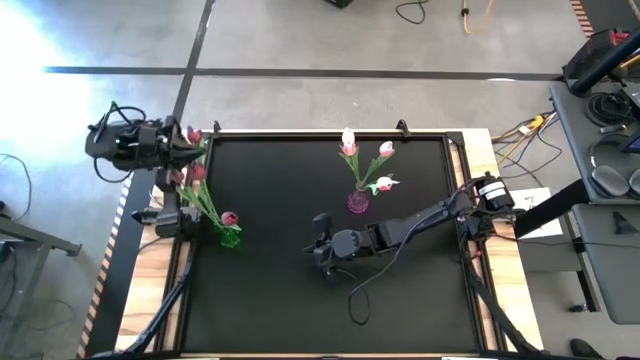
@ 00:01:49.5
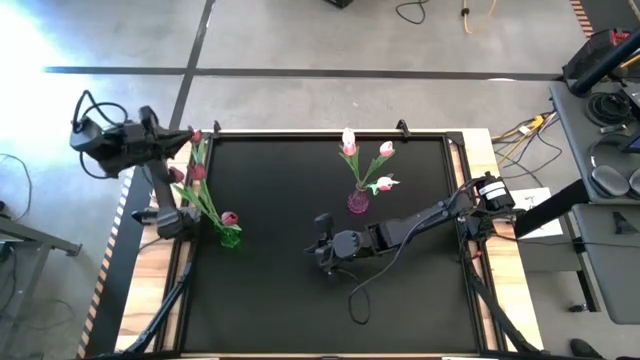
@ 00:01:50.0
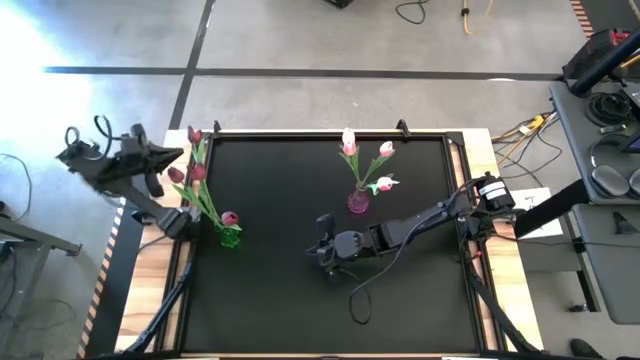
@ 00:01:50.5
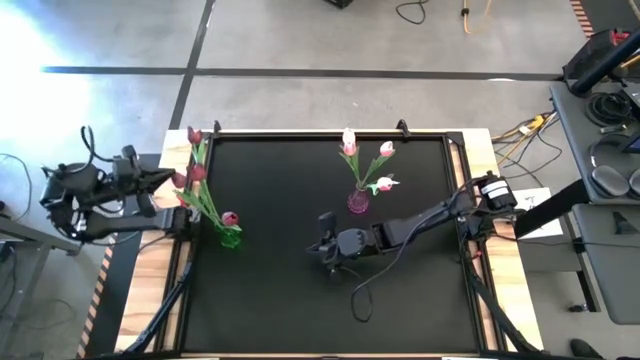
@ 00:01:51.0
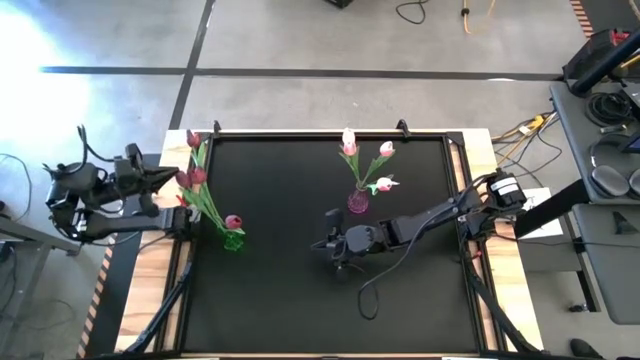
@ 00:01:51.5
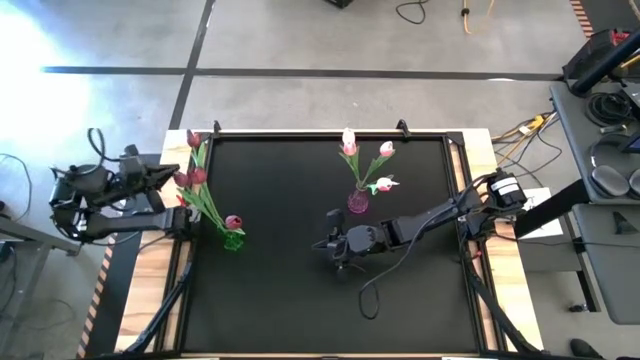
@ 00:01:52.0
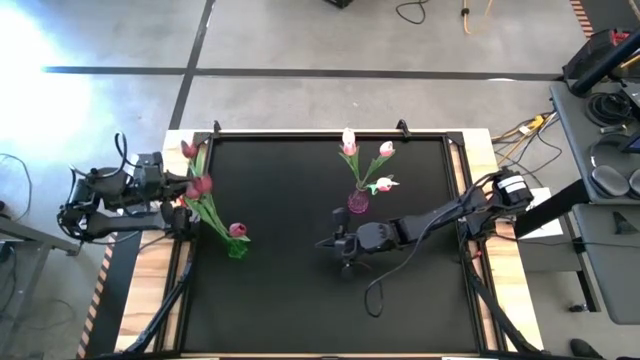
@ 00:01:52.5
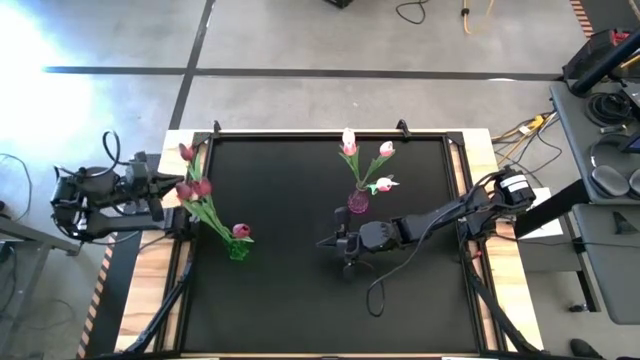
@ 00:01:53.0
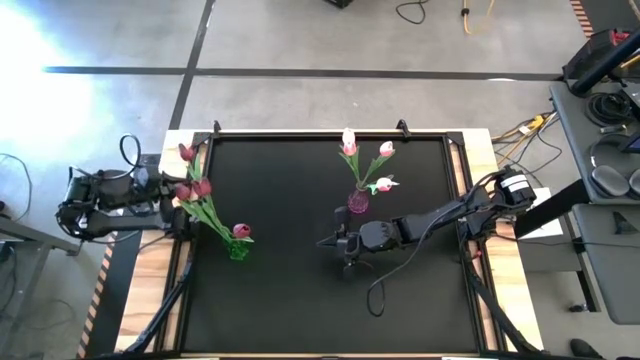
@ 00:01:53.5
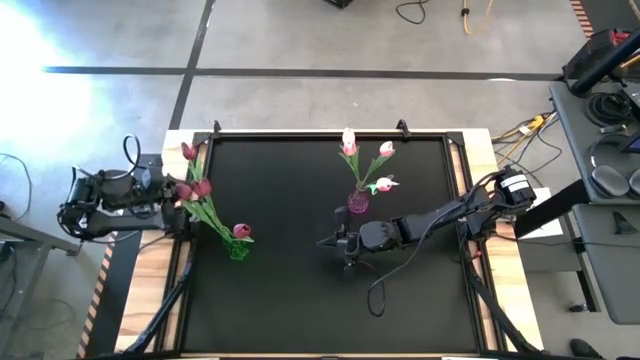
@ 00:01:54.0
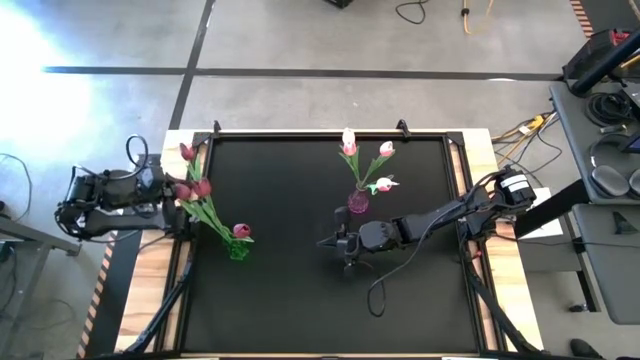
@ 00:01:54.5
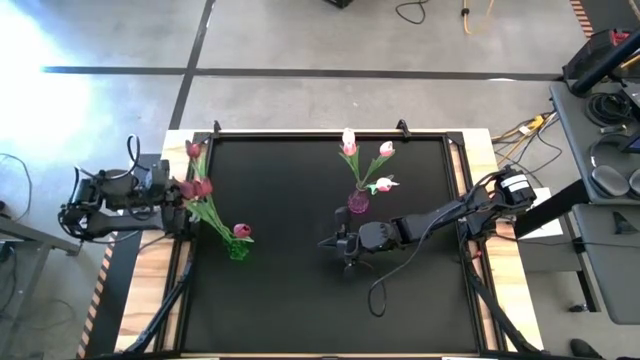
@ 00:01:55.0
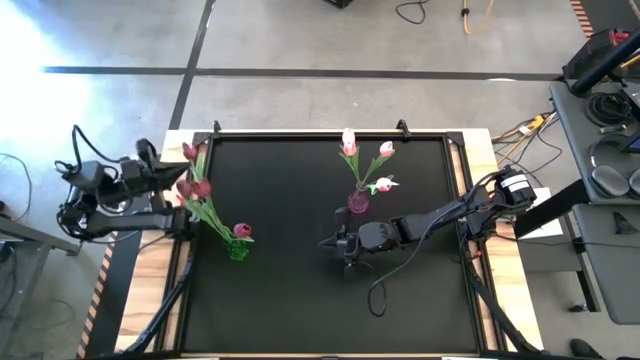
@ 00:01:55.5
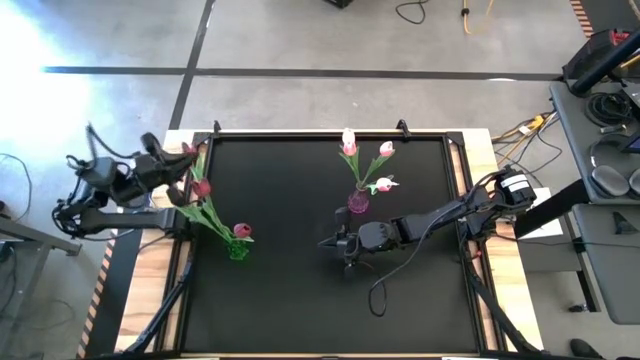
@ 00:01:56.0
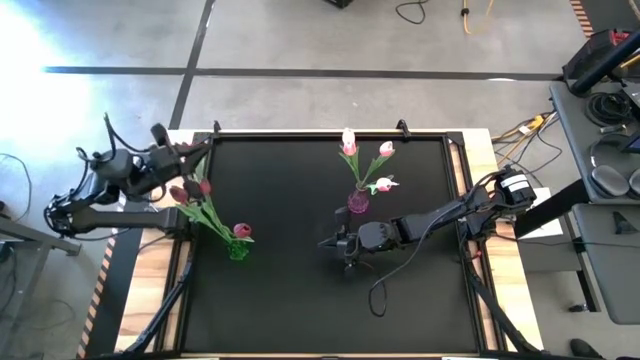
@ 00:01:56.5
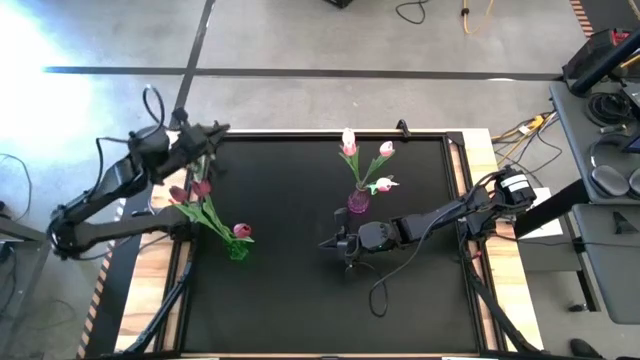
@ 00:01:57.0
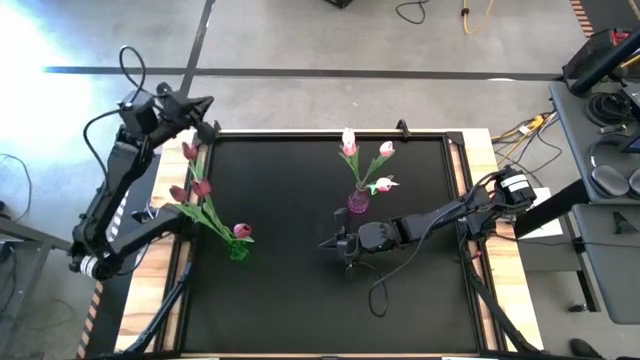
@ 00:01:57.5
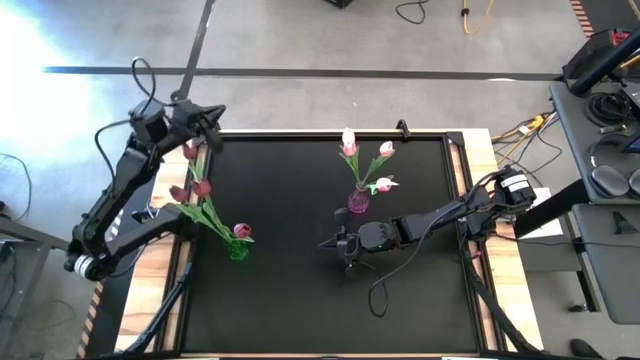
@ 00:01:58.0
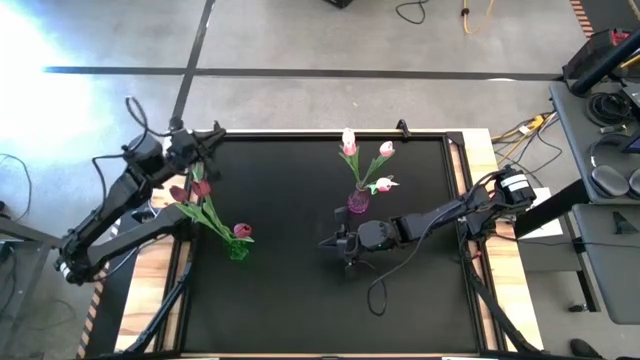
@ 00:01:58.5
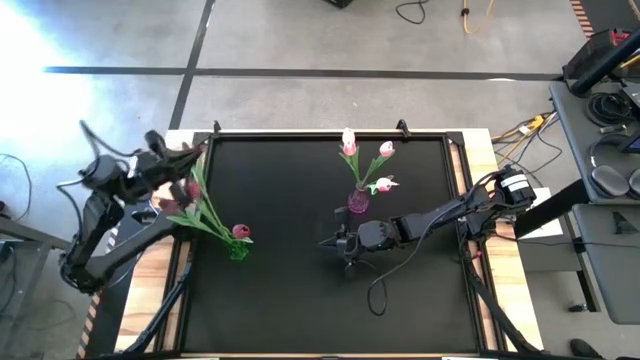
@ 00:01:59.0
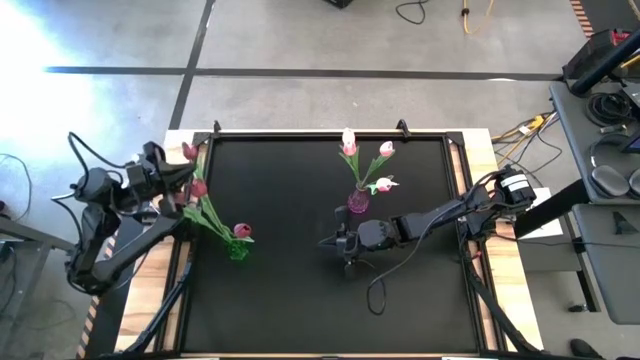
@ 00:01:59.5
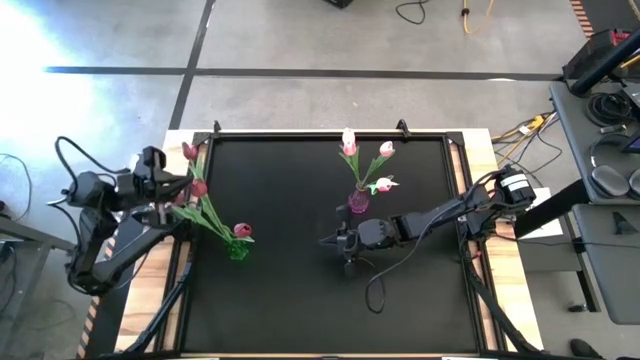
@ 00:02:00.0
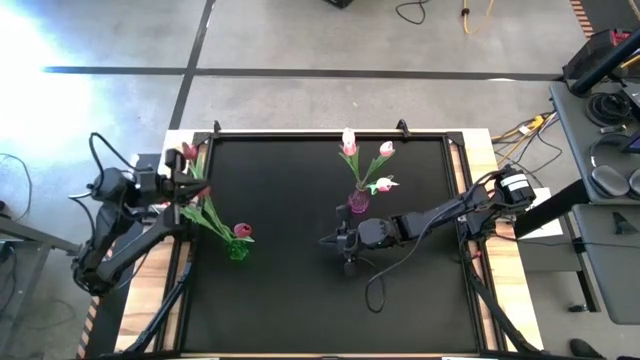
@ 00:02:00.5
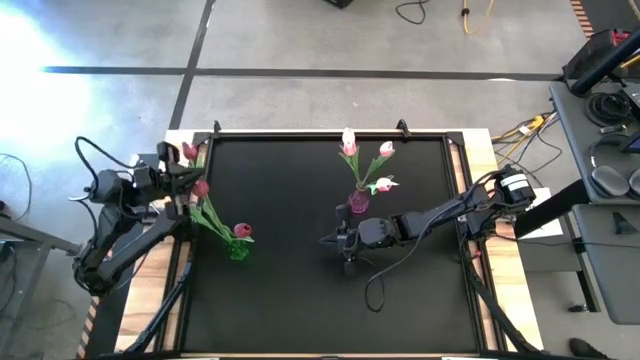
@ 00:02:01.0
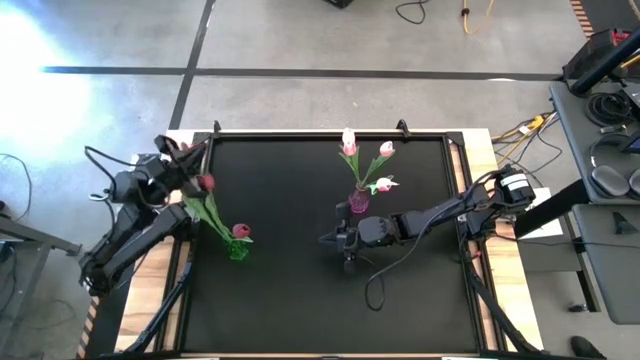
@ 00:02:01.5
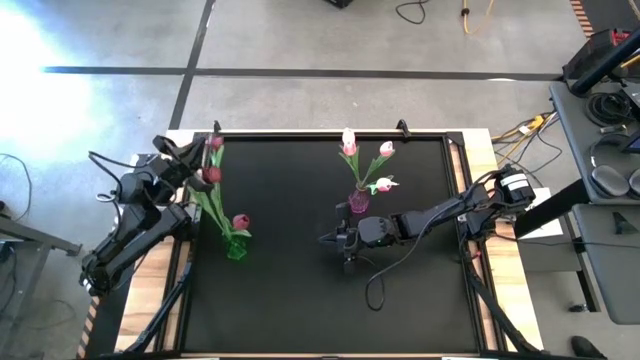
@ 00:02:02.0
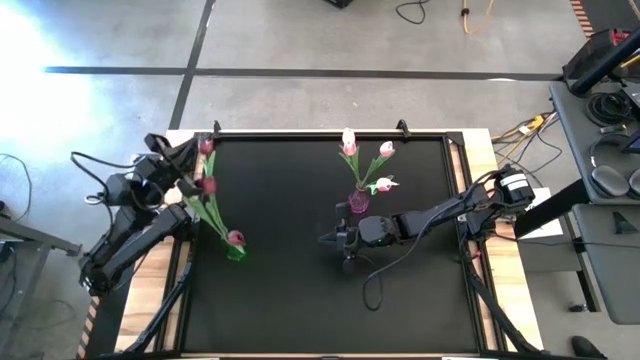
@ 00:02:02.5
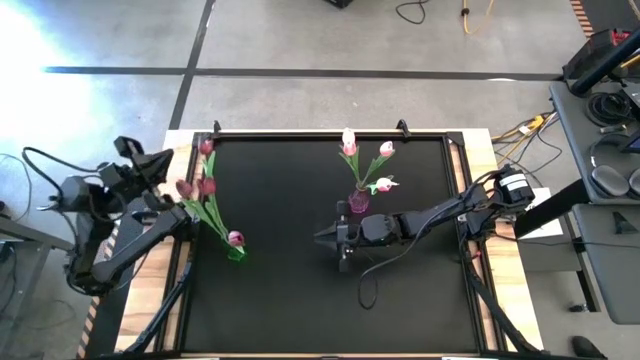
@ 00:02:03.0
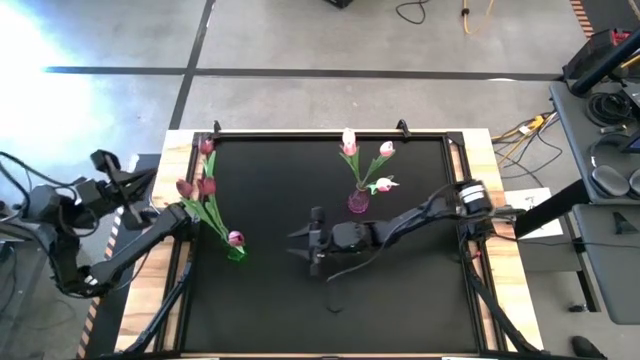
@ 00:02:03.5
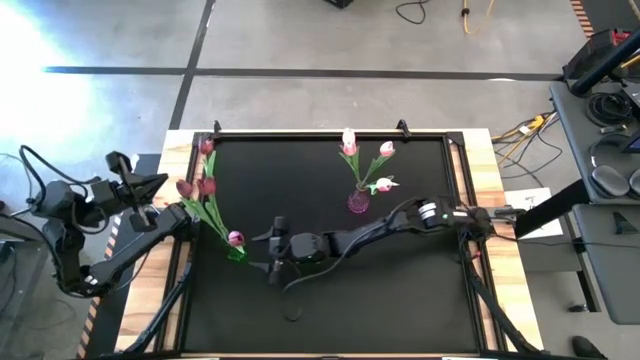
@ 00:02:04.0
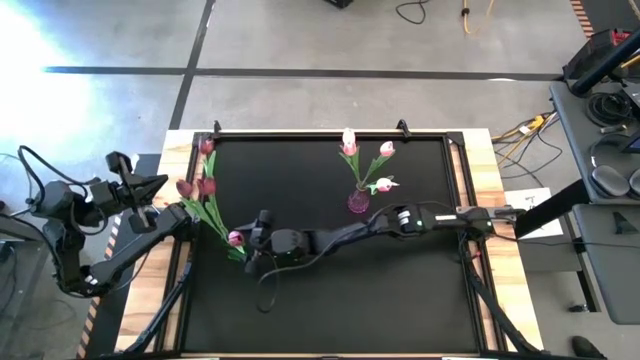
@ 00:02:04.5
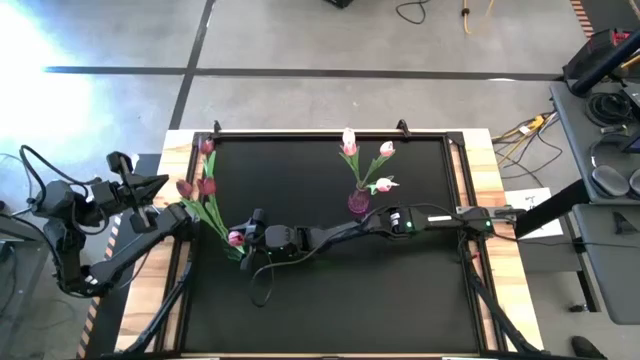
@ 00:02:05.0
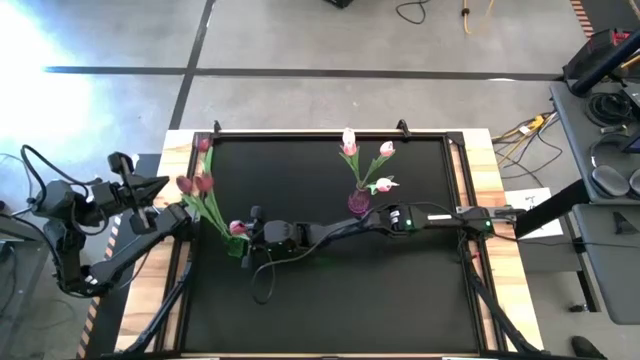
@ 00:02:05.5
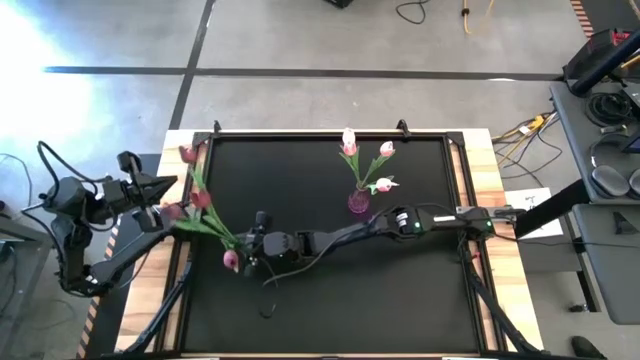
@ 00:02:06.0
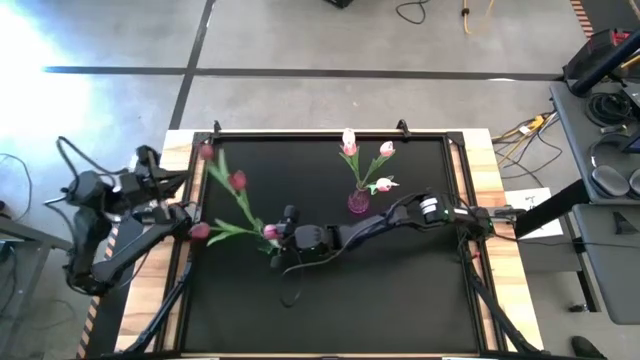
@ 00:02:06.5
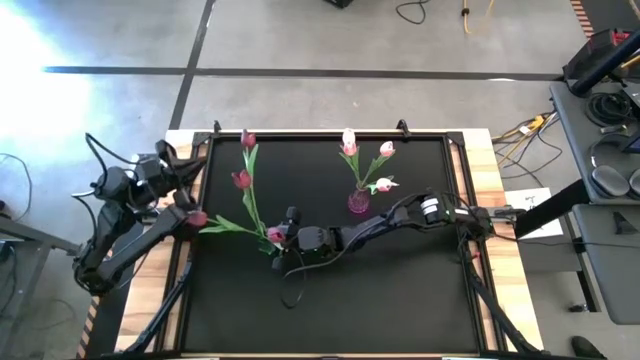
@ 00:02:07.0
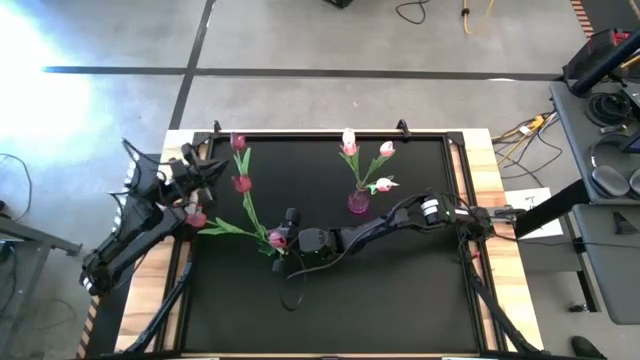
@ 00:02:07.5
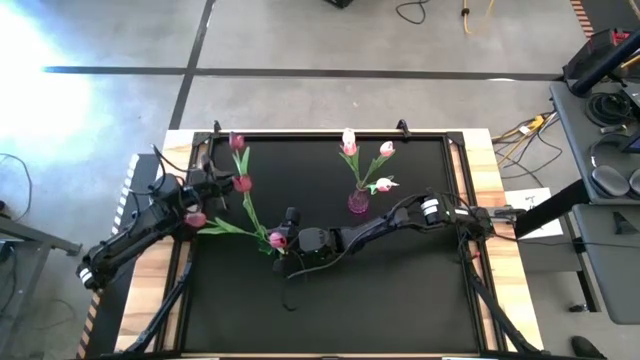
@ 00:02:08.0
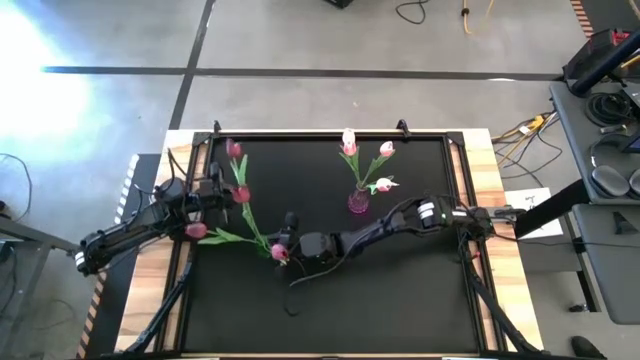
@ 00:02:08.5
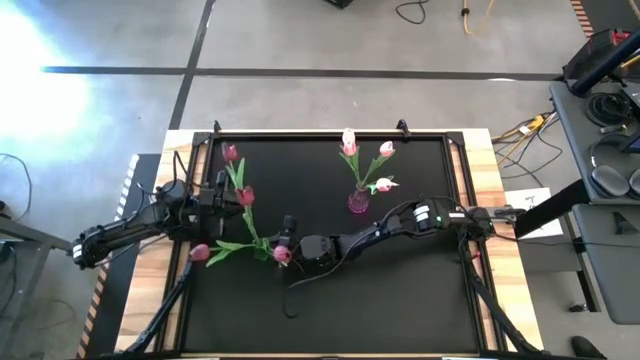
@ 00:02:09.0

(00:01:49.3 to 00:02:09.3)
Task: Sort flowers into vase by color
Adjust the green vase on the table

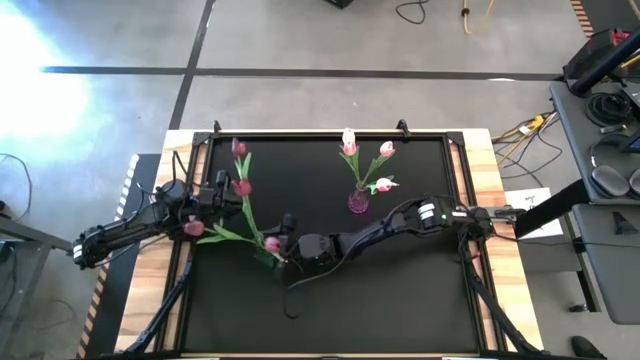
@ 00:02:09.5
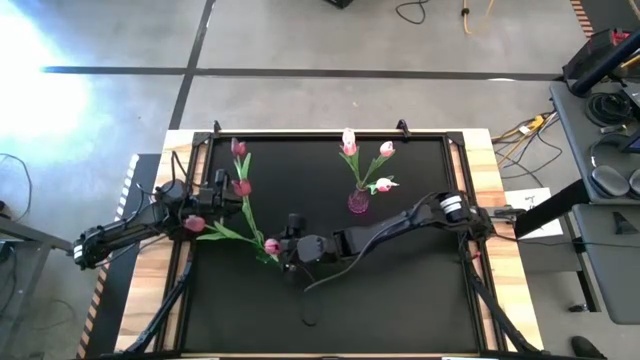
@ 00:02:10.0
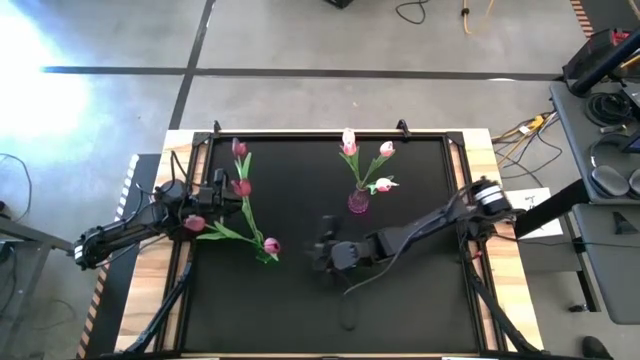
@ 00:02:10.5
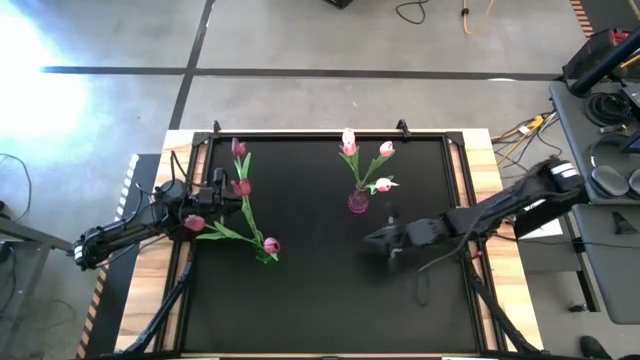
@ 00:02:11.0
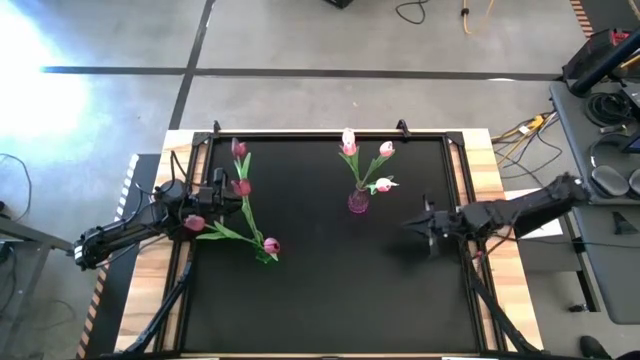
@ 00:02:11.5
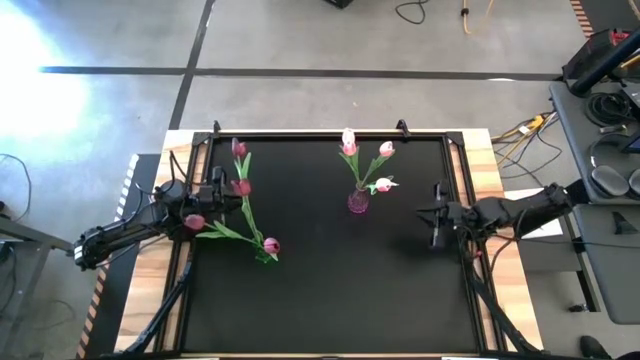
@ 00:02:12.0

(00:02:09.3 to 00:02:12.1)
Return to Home Position
